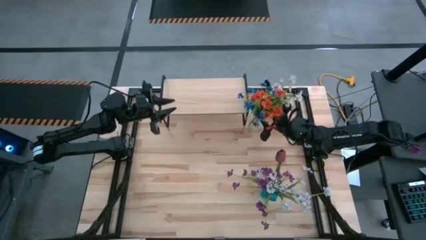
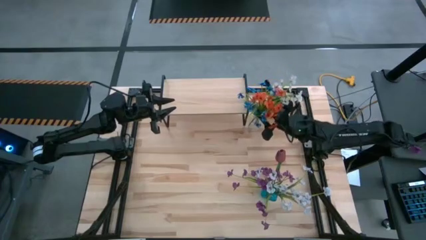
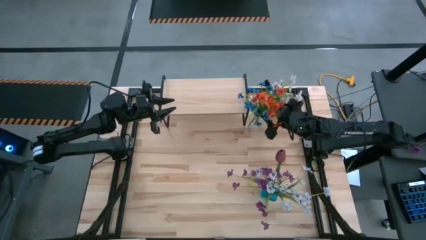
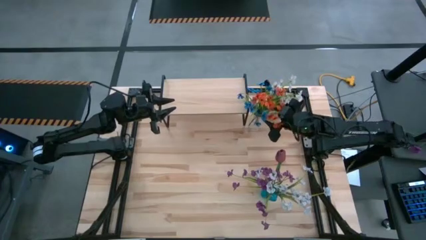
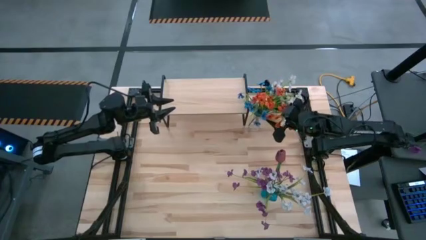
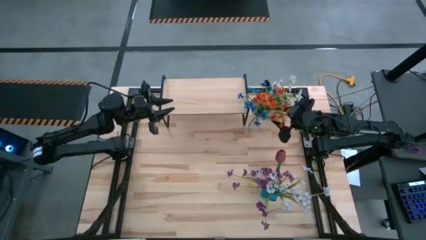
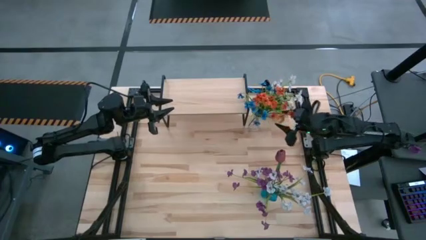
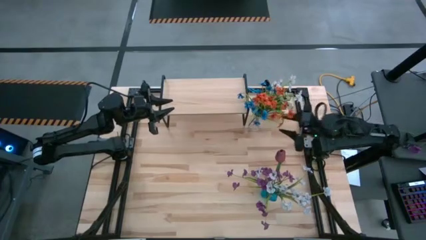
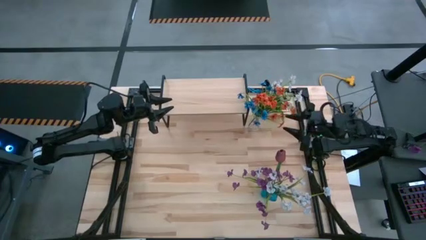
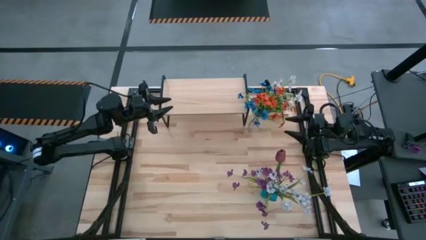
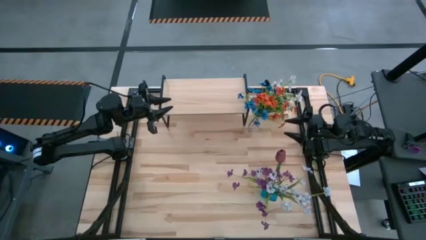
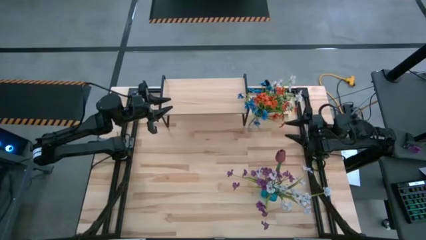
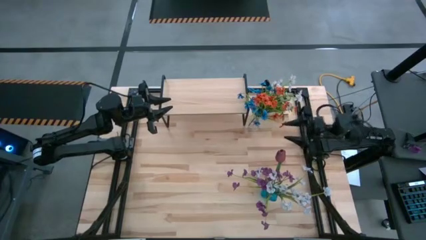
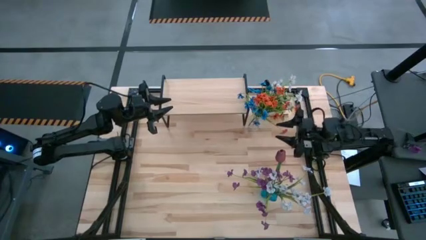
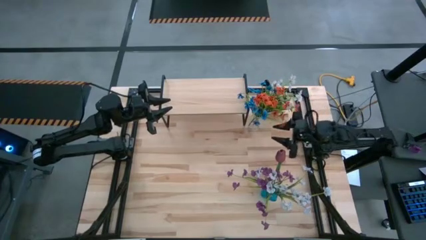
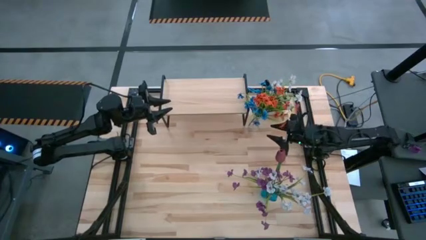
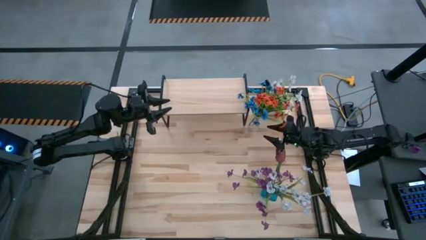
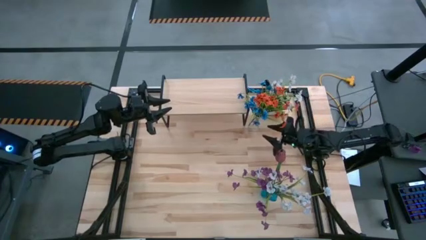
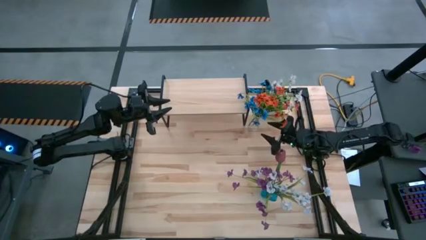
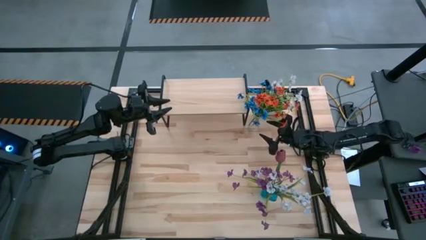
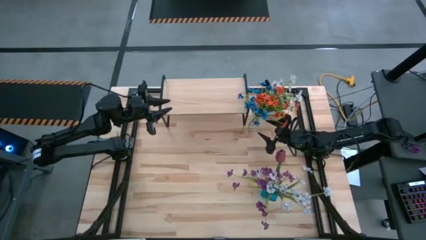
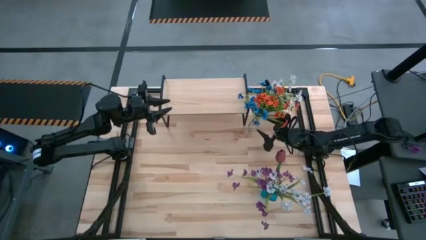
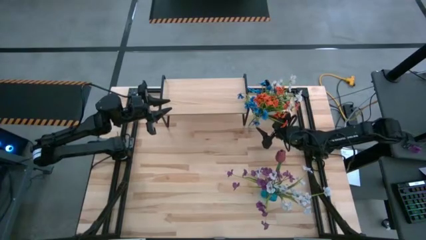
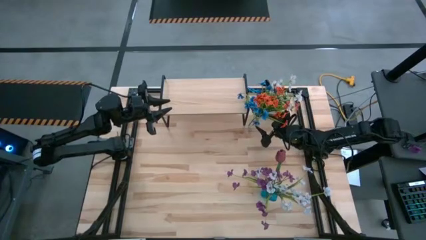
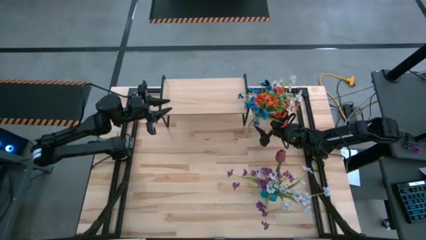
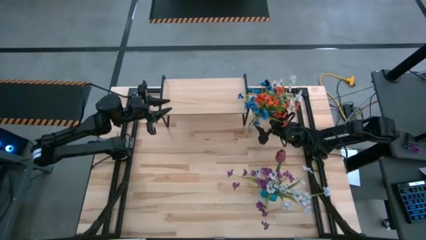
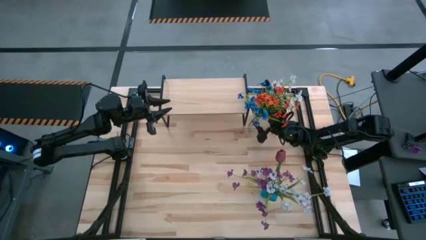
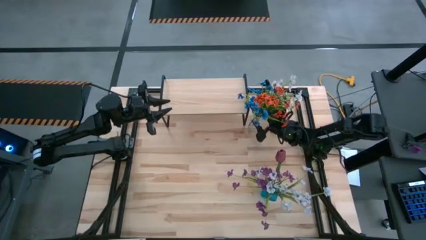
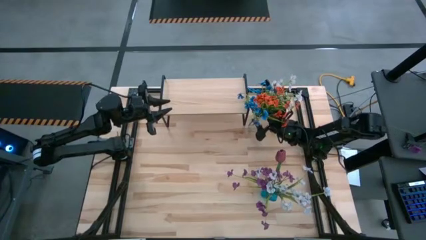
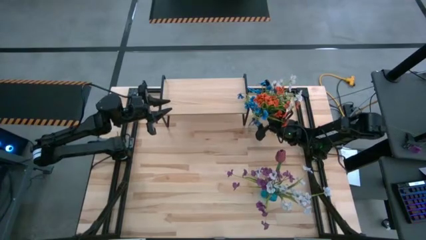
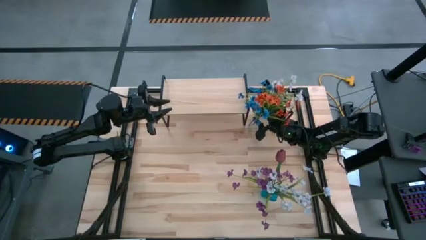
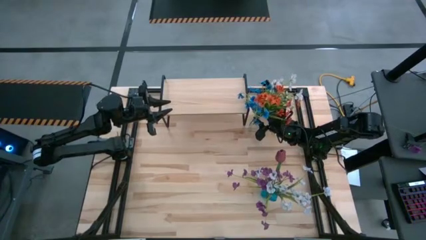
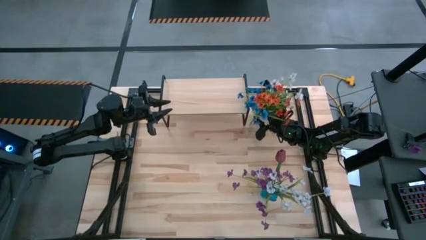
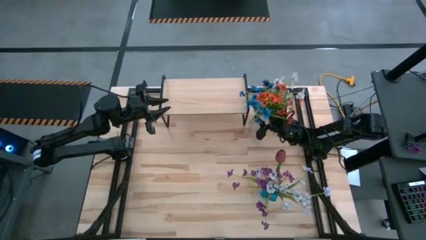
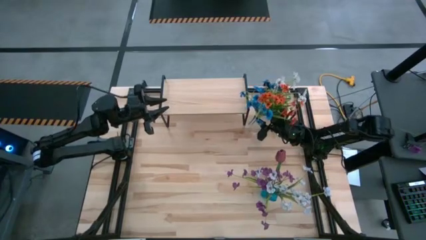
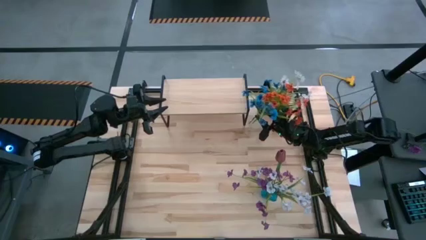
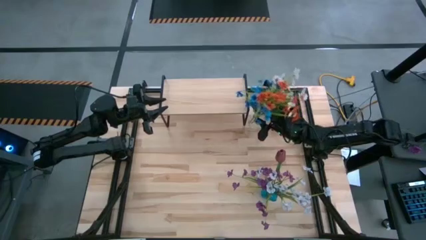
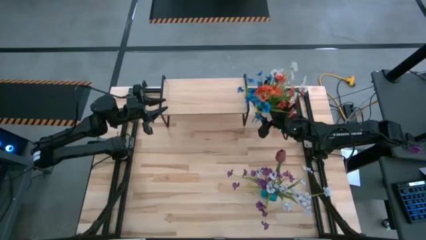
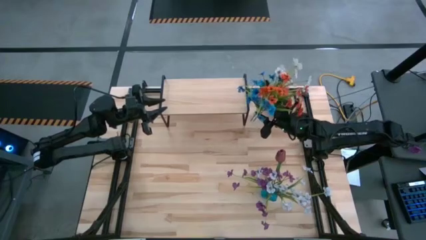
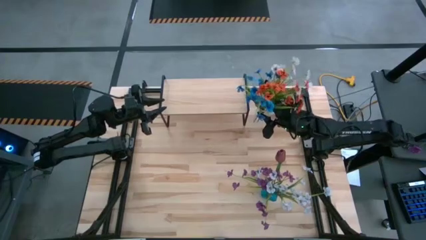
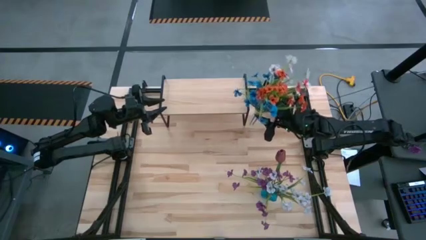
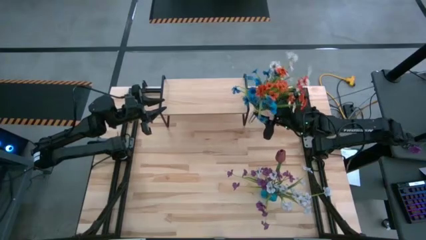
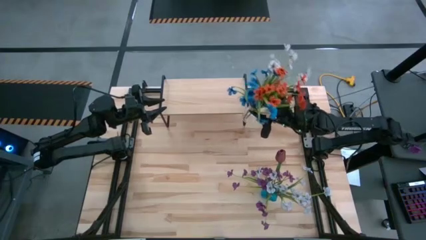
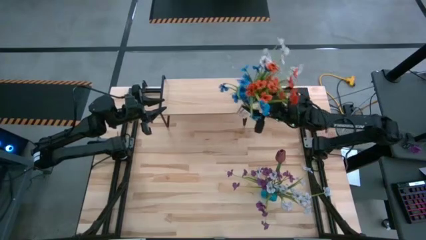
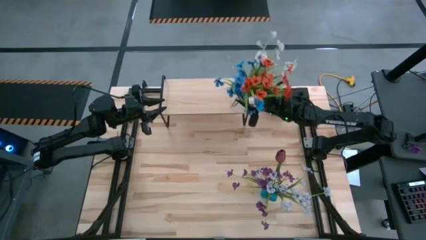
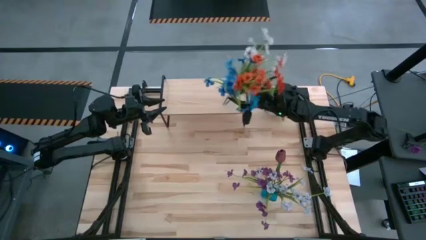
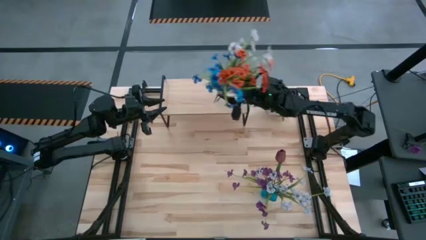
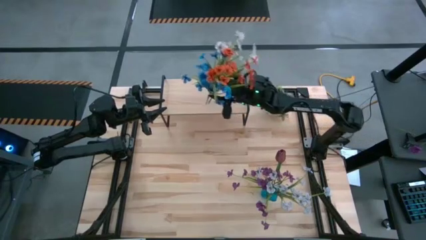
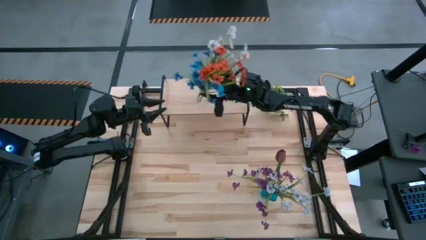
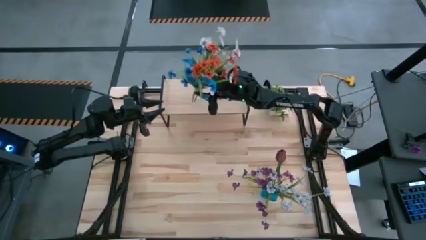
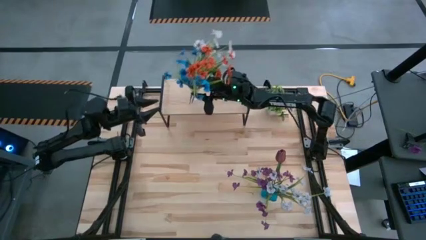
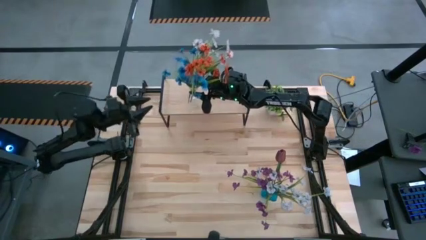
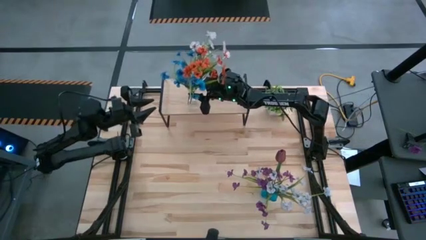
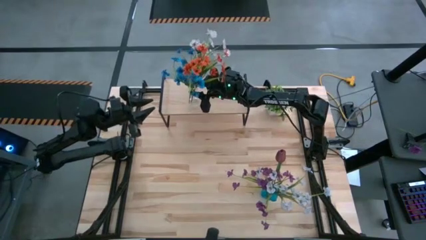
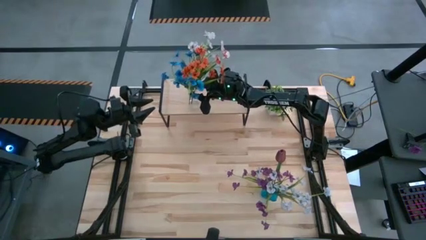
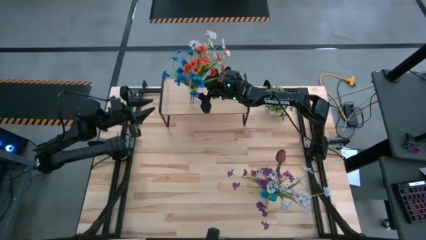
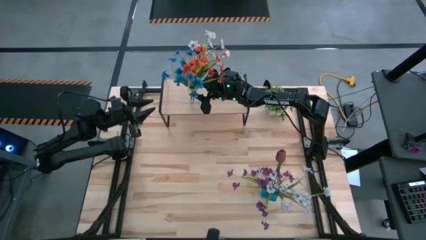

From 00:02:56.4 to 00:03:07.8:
Task: Pick and place flowers into a vace then onto a shelf
Put the transparent flower vase on the shelf

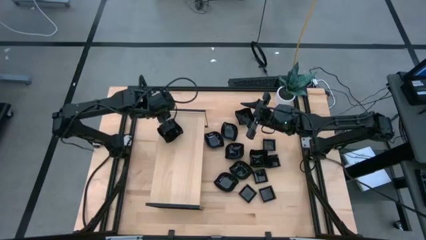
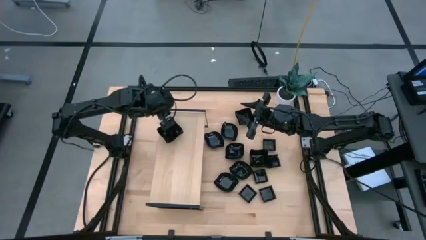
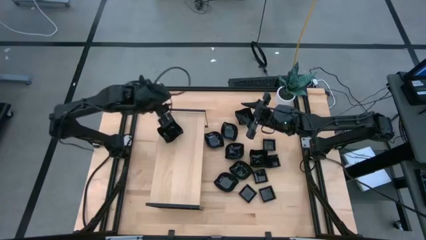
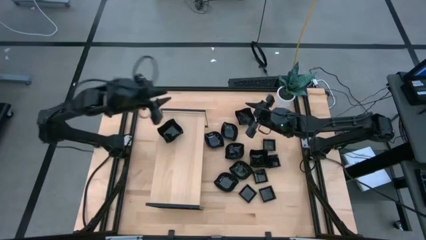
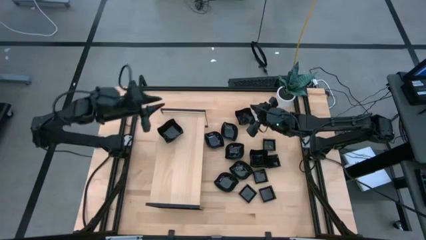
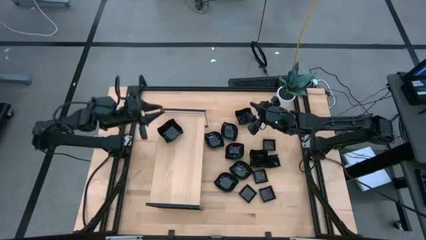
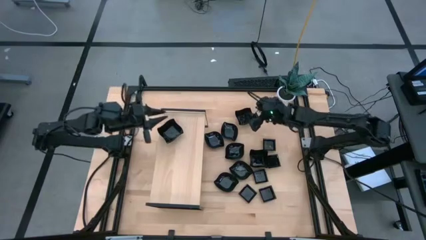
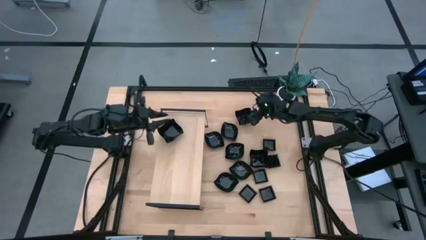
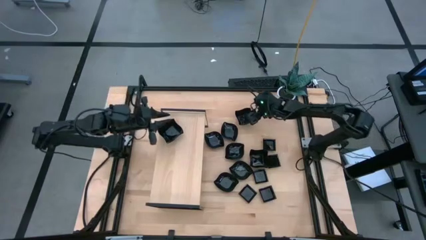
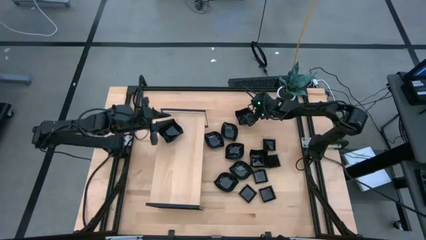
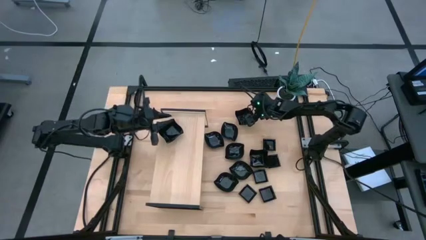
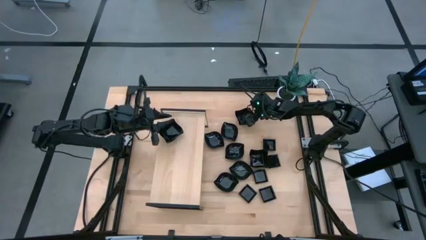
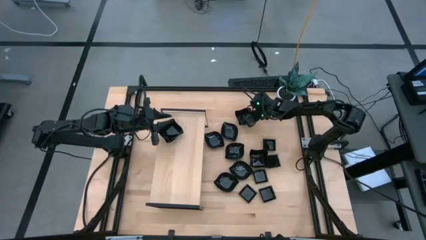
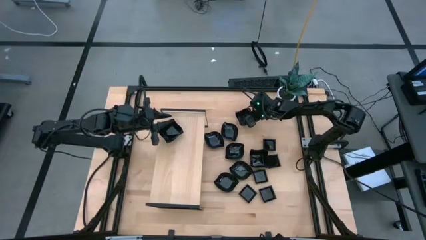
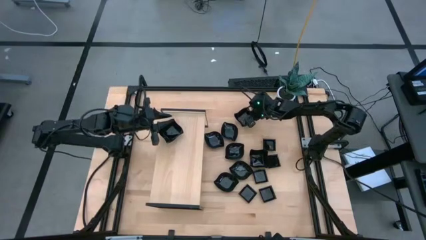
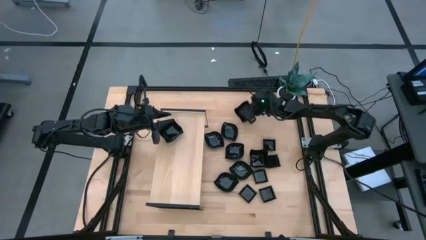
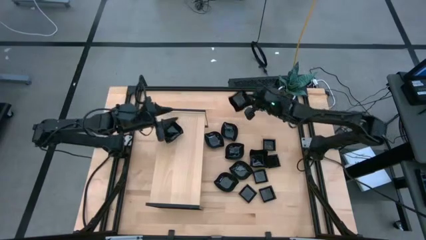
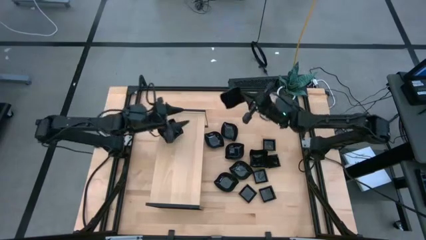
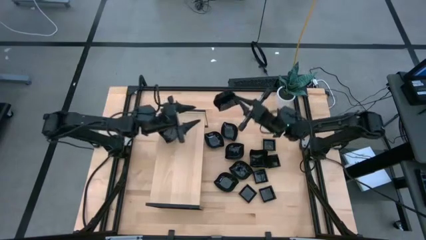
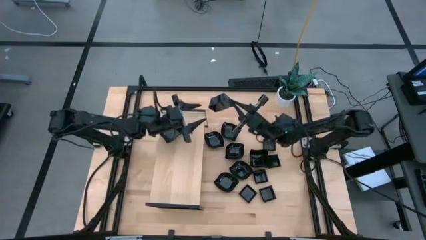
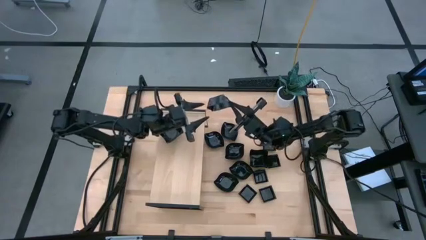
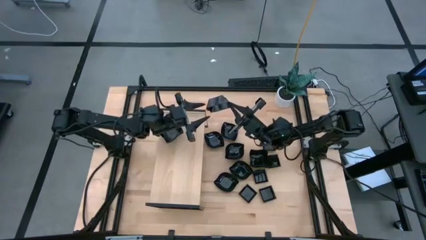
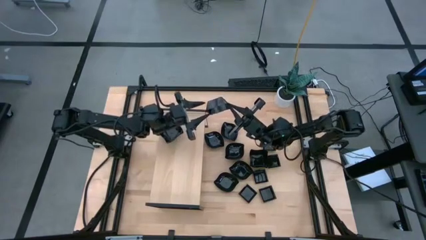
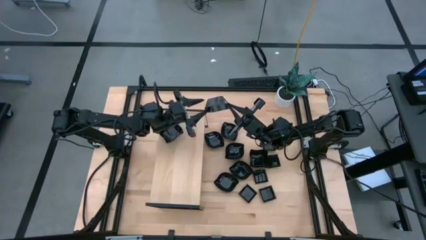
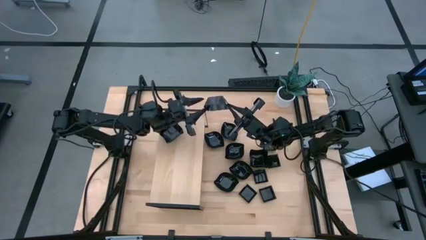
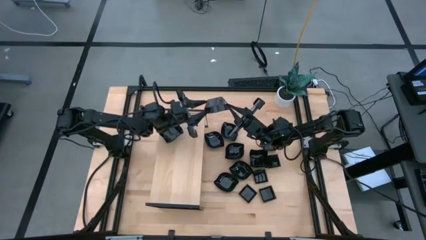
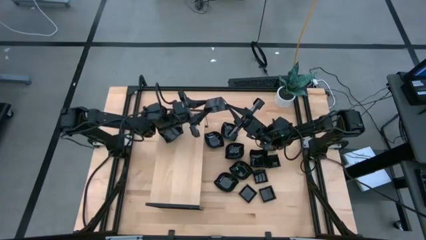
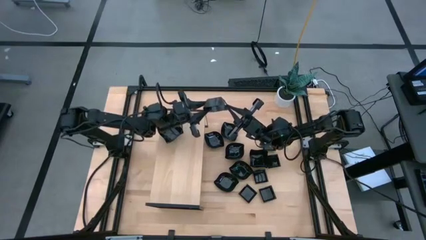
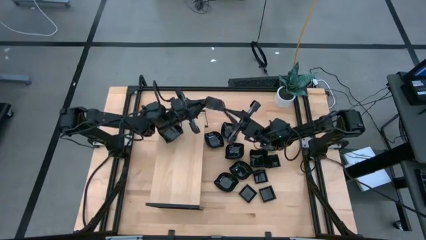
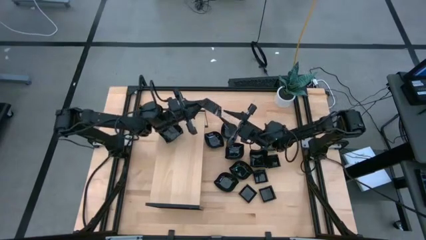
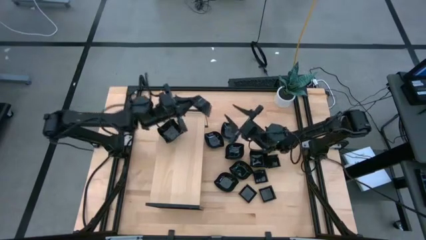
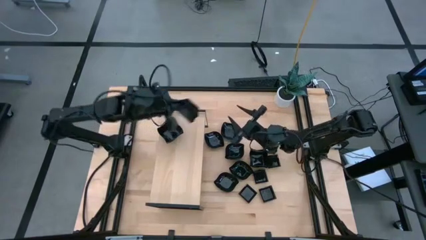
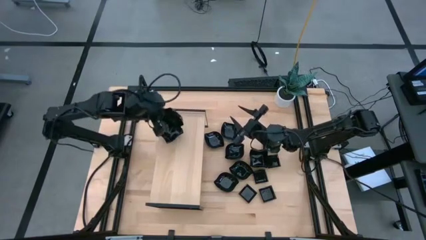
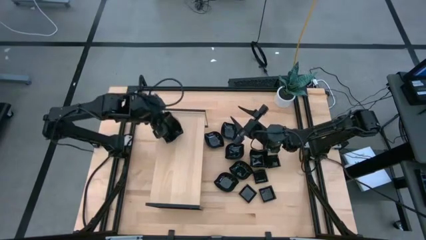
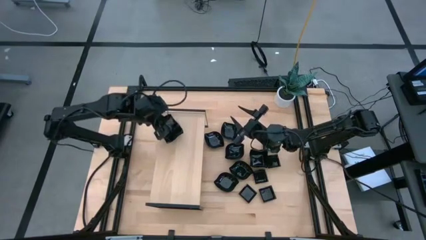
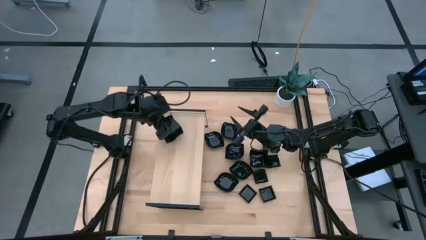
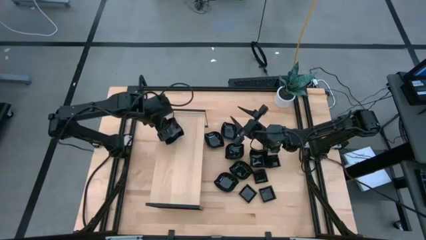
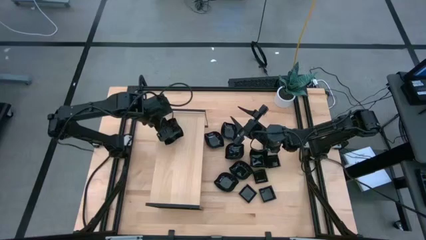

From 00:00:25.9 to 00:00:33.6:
Task: Pick & Place Mini shaped plates
Stack the distorted square plate on top of the distorted square plate on the shelf
